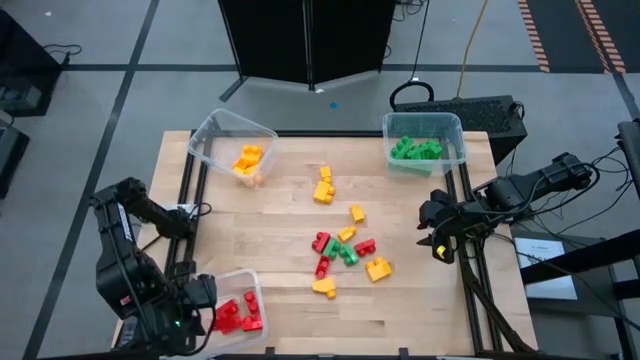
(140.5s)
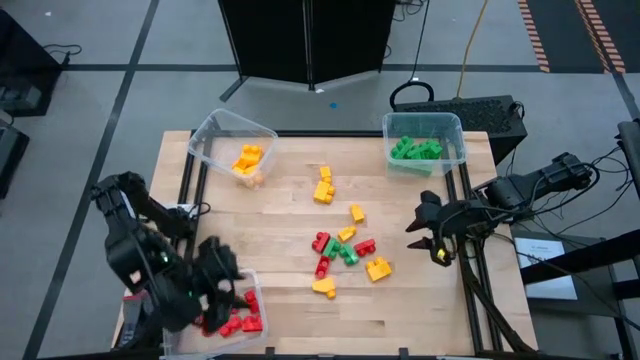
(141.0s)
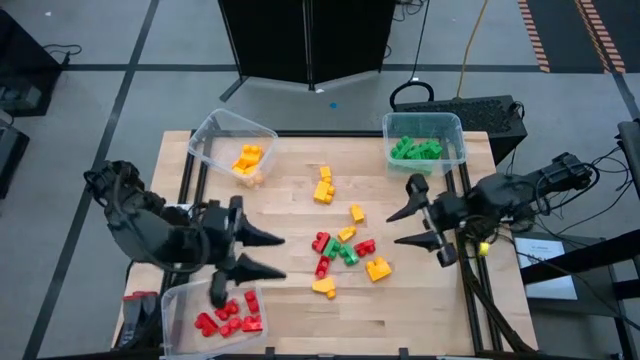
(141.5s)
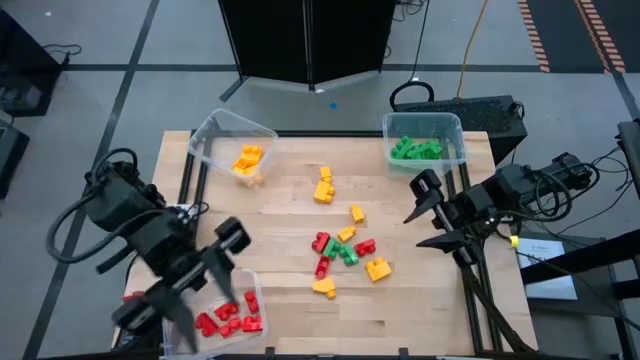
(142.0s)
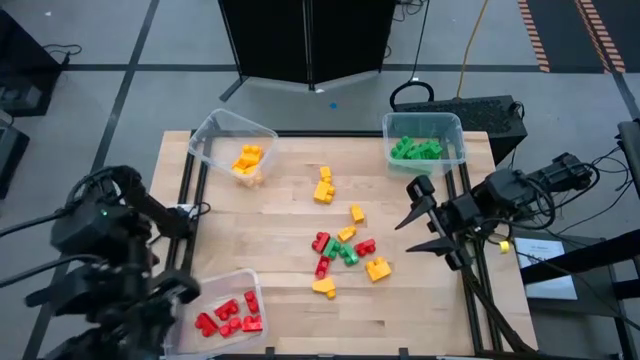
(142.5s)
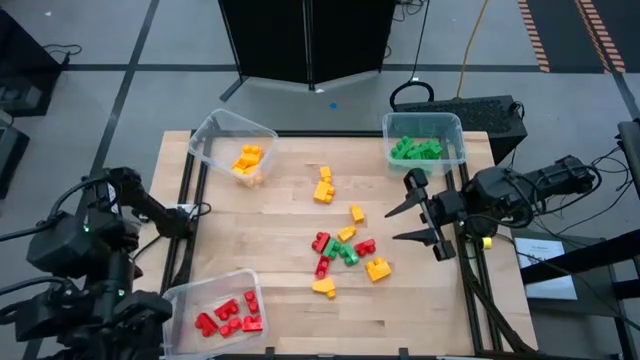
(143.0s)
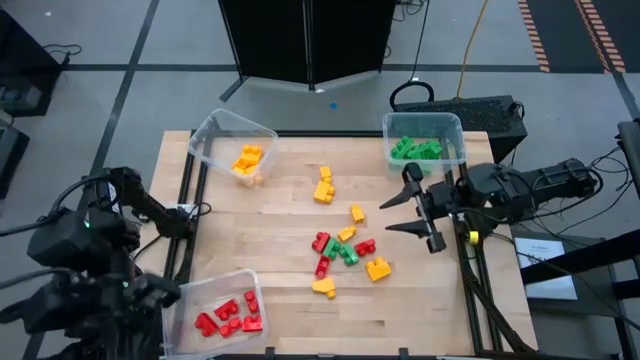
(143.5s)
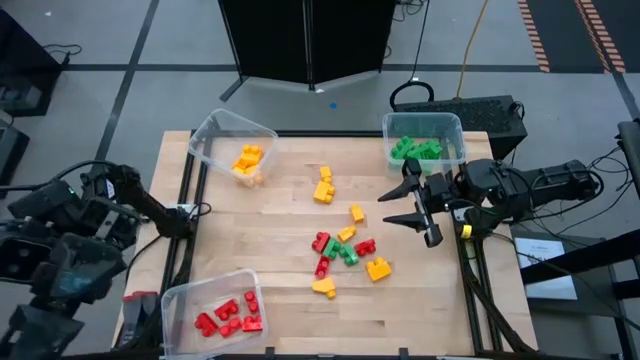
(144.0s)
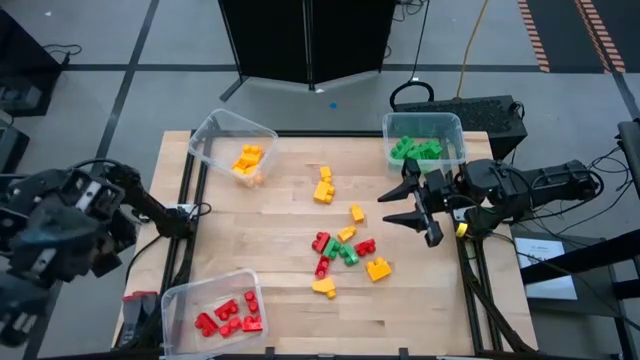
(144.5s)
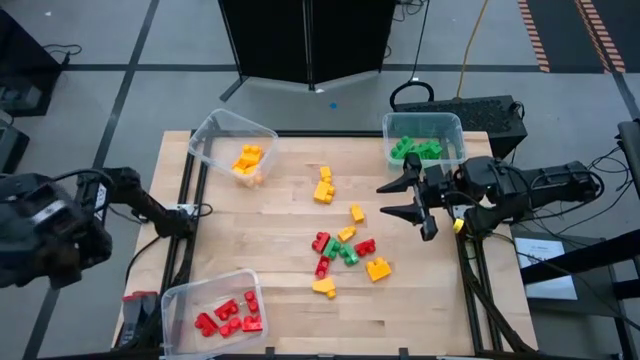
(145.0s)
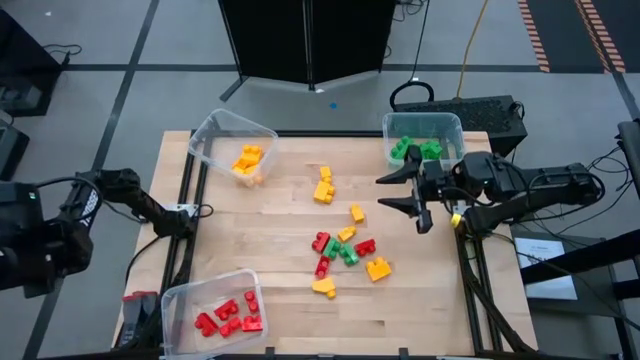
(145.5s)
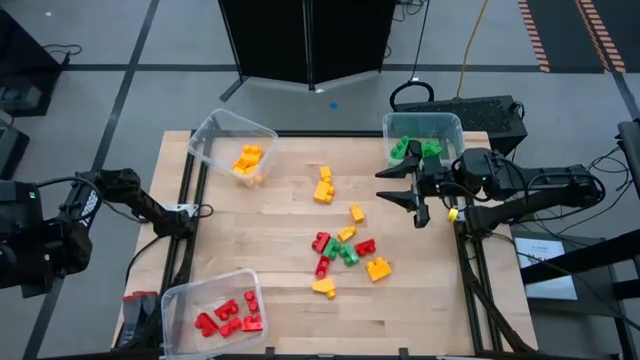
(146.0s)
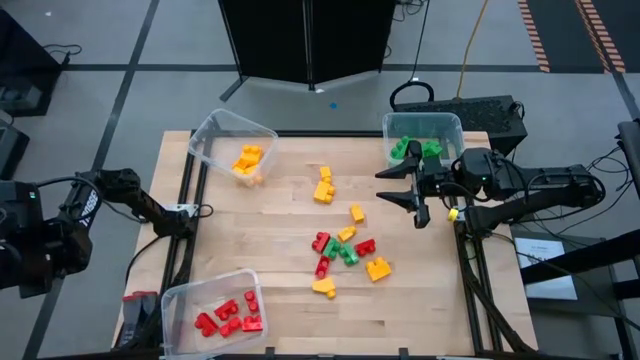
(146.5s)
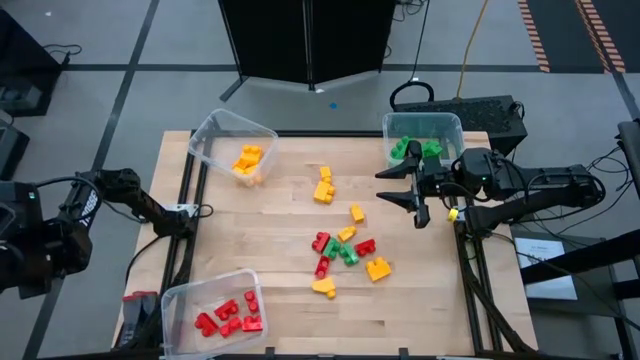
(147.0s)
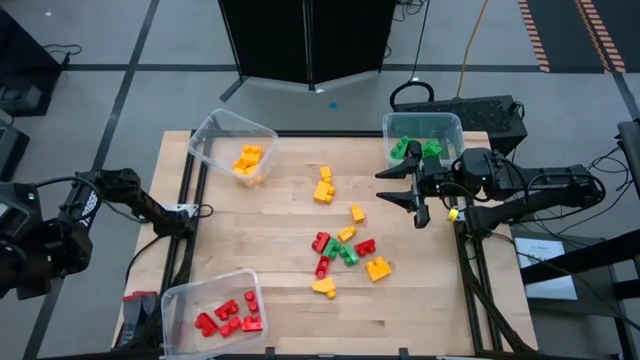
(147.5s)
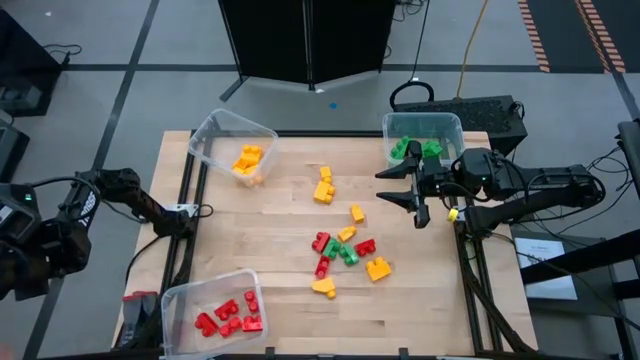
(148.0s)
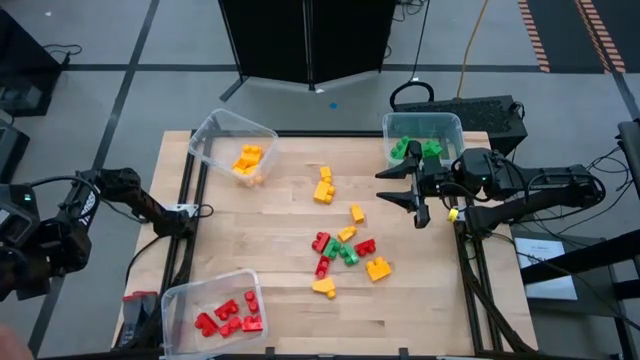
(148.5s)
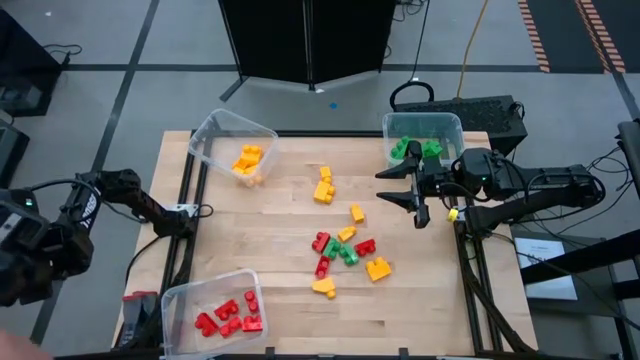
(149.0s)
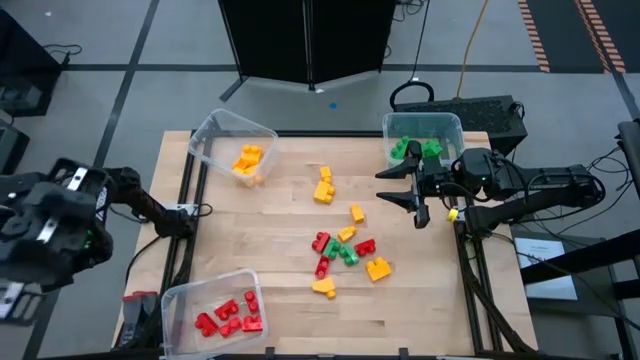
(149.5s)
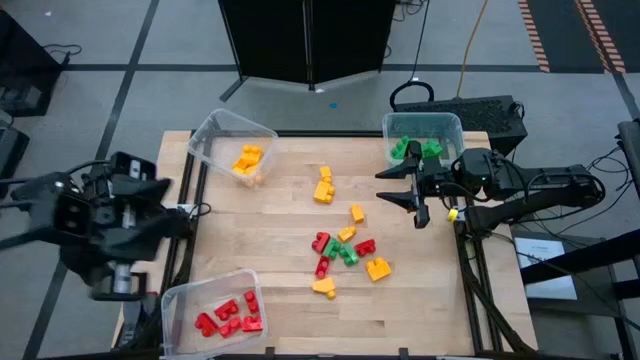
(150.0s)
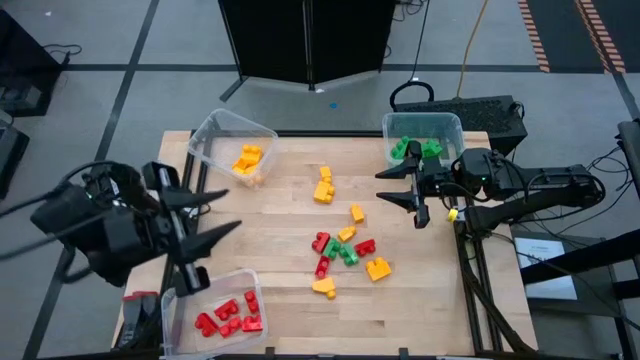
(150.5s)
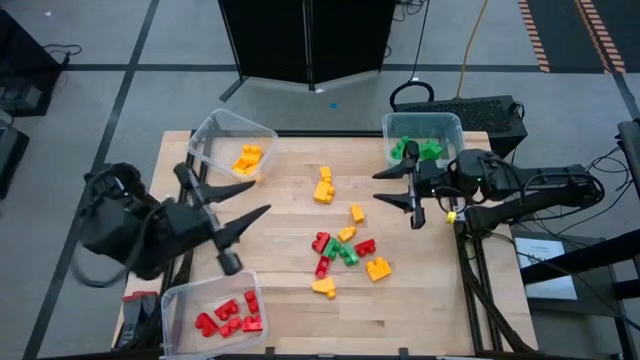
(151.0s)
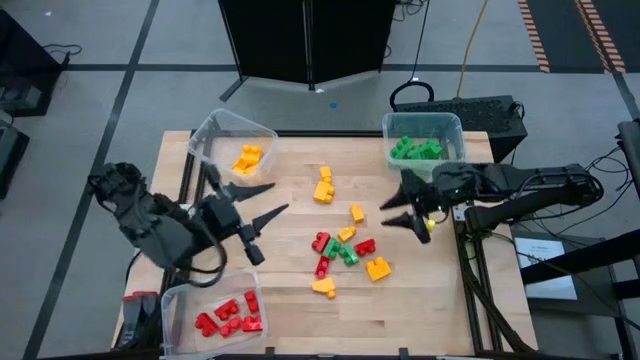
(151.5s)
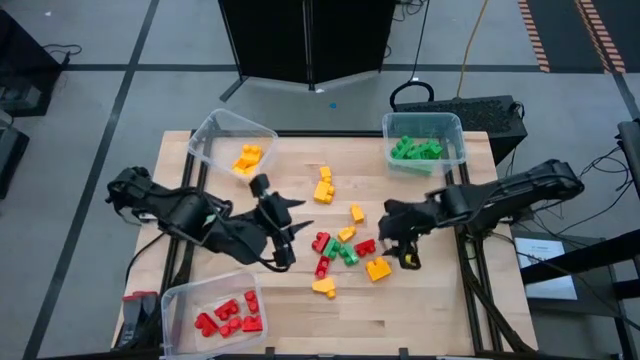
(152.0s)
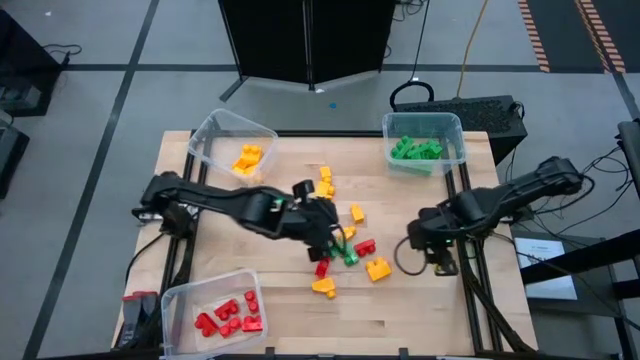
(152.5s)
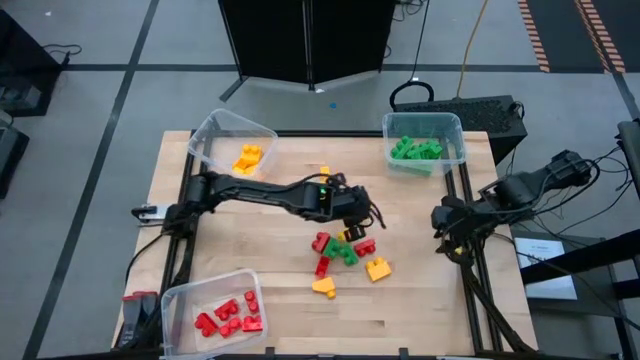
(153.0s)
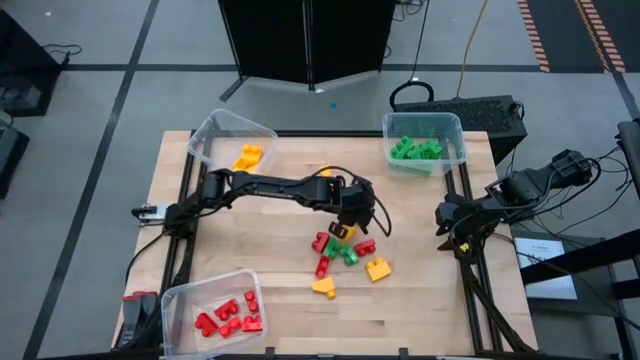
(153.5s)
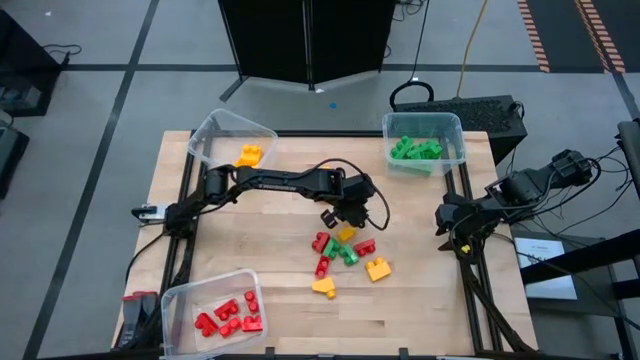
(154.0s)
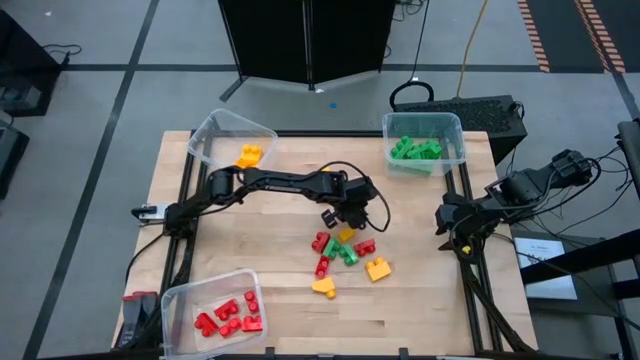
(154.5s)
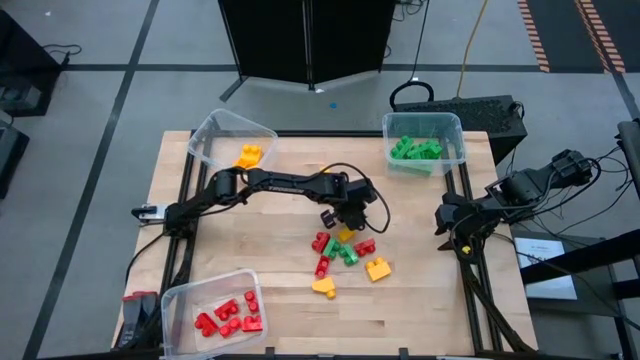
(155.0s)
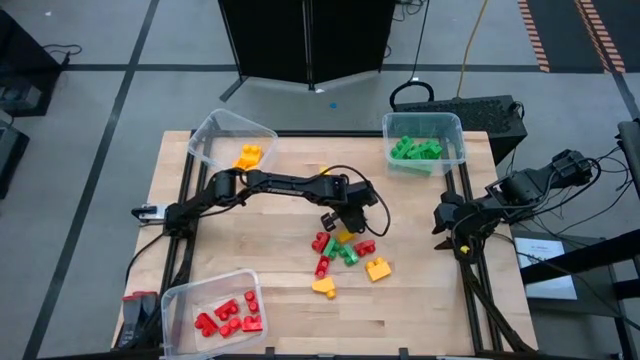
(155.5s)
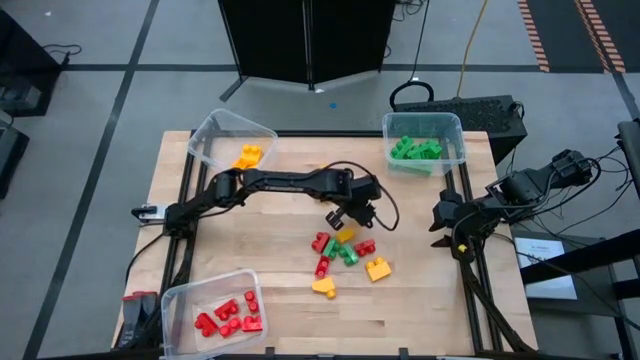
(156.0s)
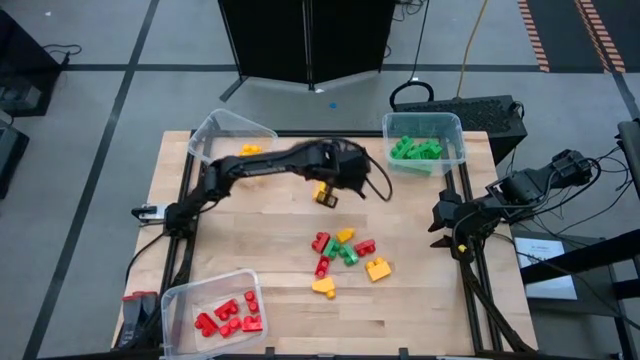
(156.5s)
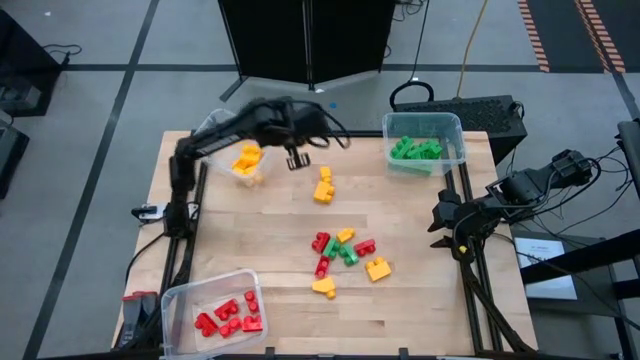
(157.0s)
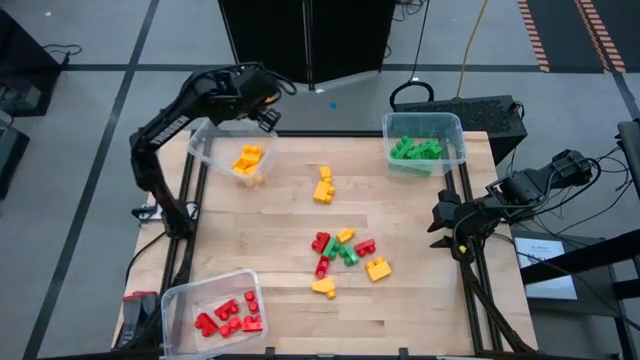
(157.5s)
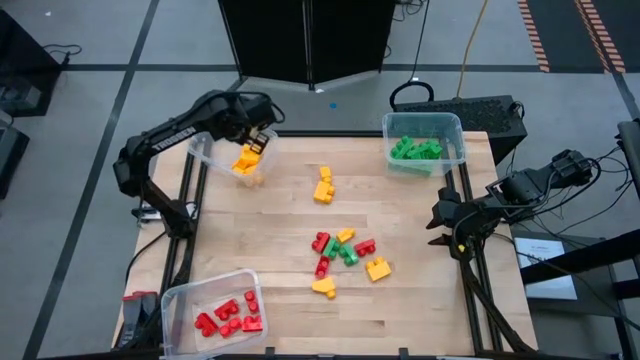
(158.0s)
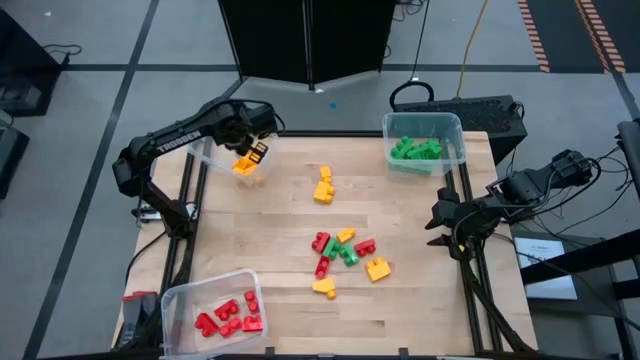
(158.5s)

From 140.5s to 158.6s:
Task: Sort blocks
Put the yellow game piece into the top left transparent bin

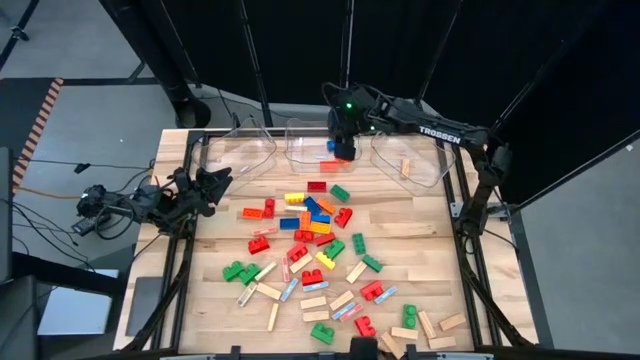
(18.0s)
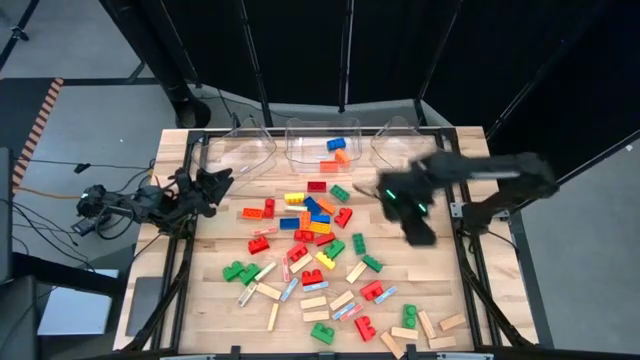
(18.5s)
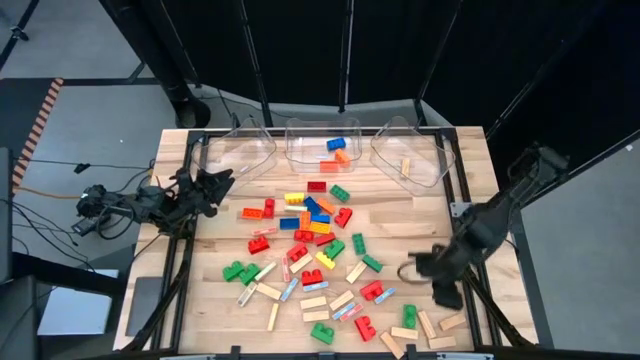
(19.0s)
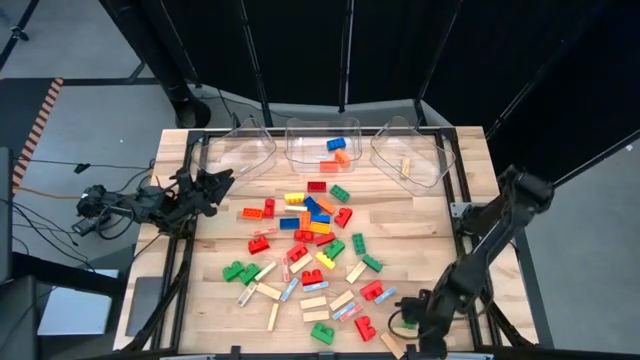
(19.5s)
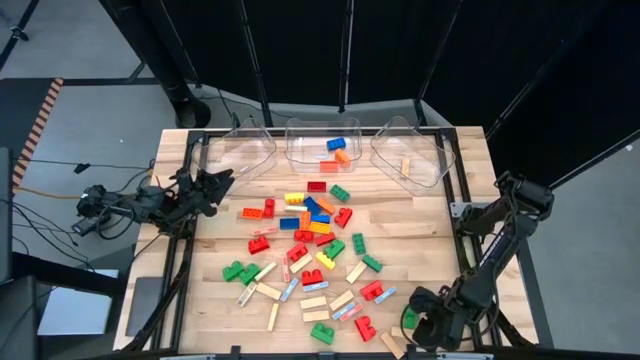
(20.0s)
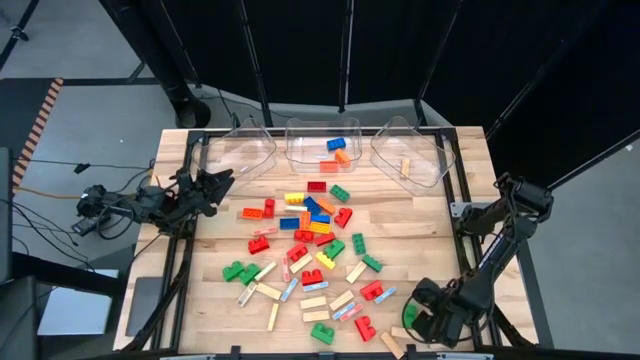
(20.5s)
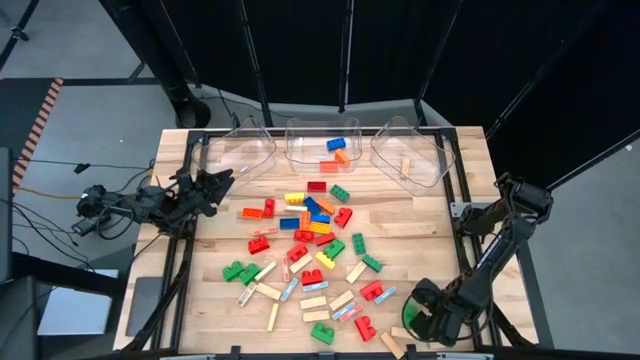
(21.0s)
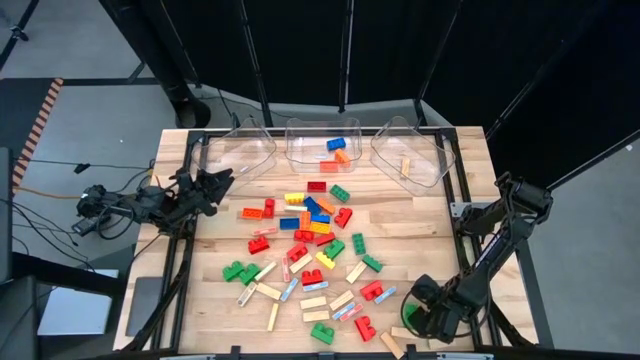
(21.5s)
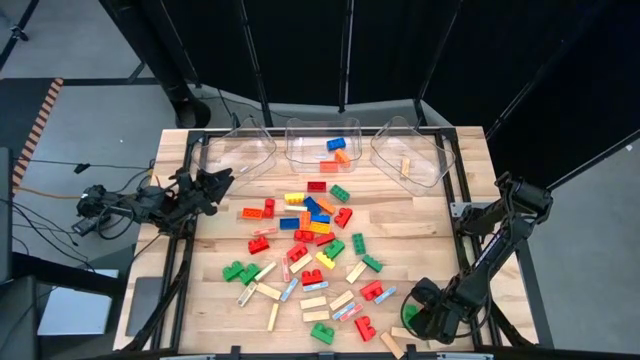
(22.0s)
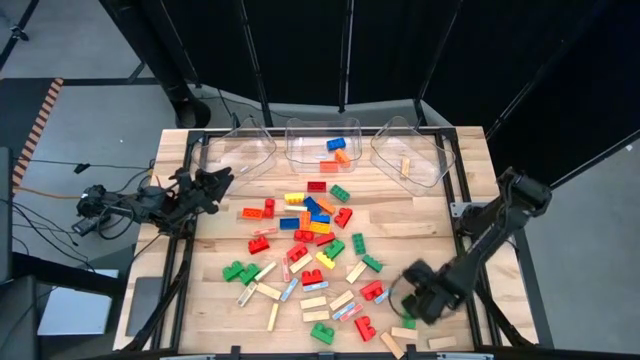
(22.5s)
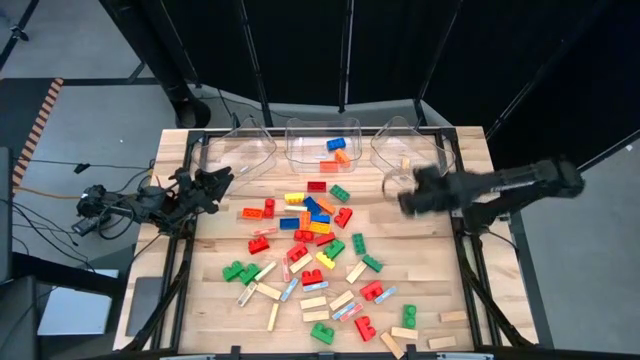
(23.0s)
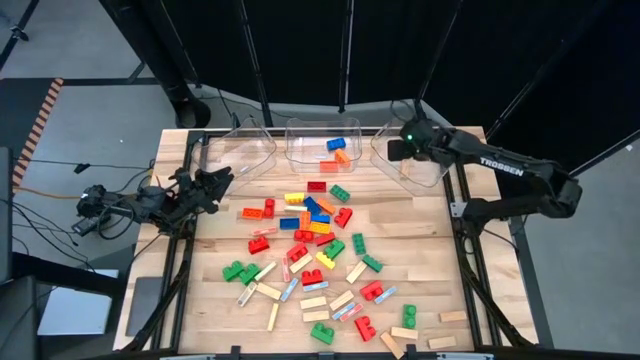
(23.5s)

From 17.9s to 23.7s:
Task: Sort blocks by size
Put the brown wooden block into the right transparent bin
